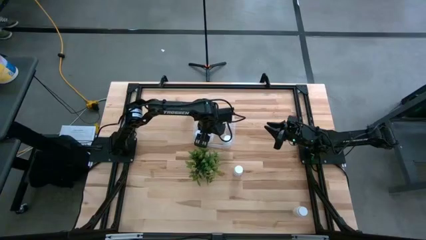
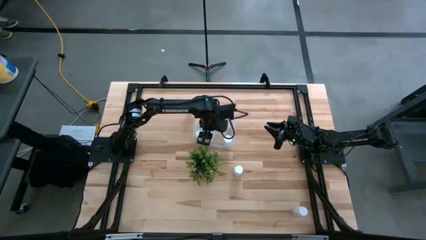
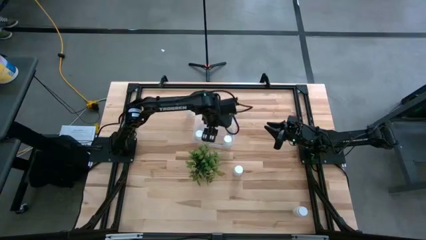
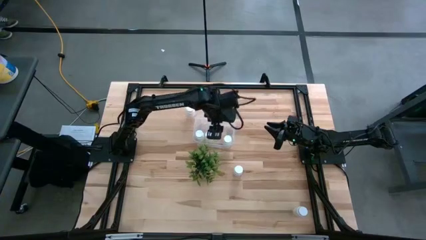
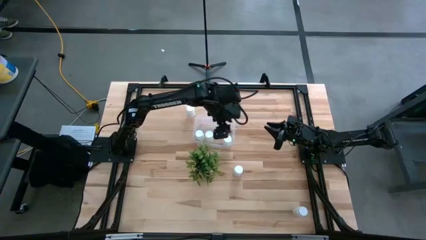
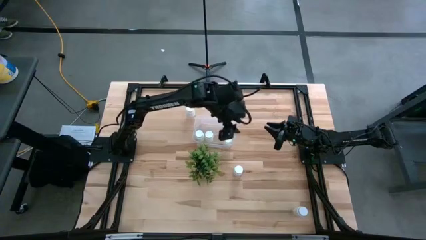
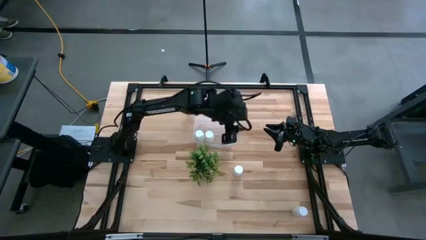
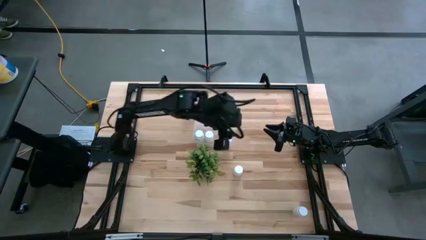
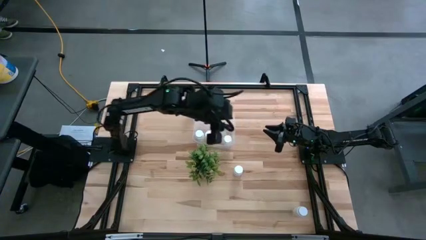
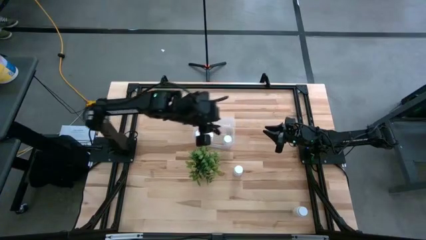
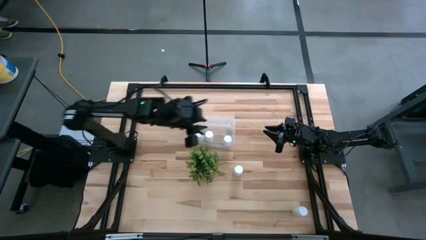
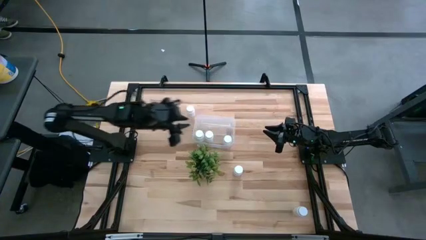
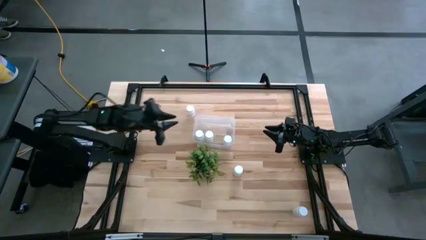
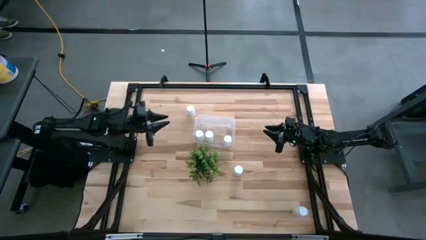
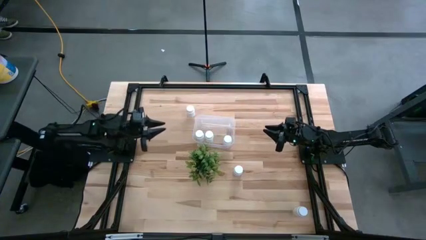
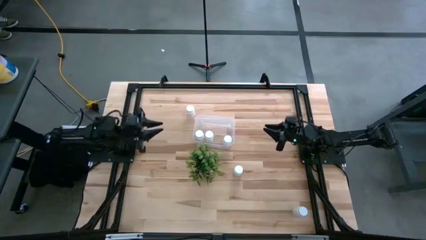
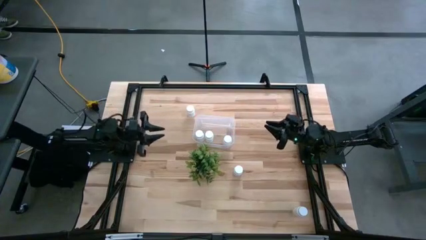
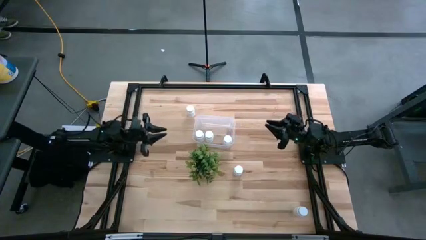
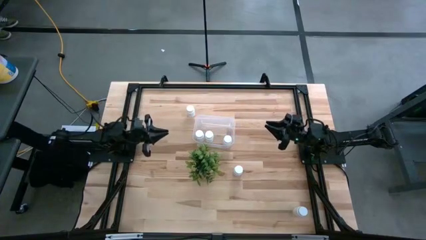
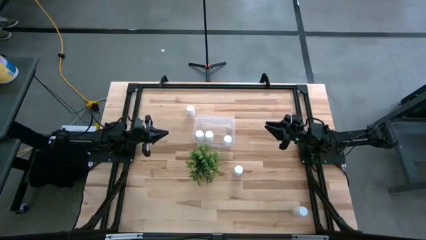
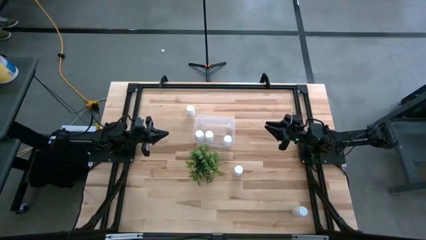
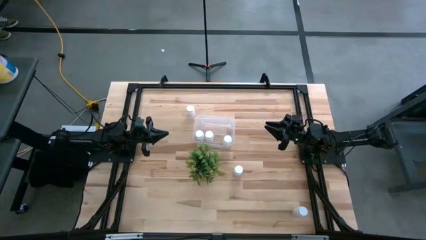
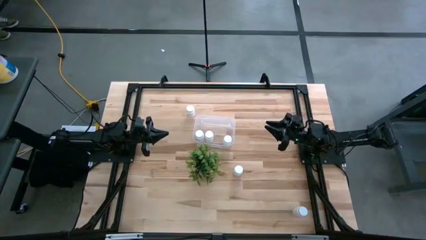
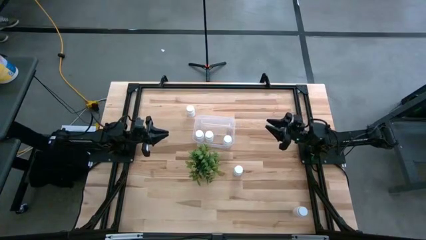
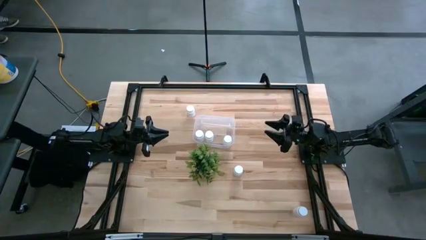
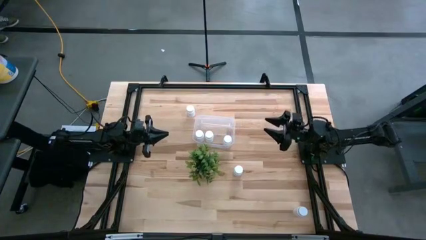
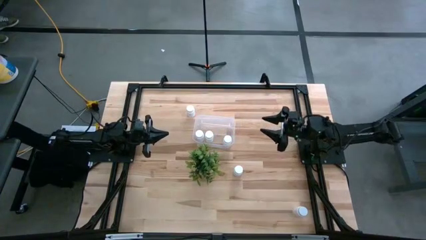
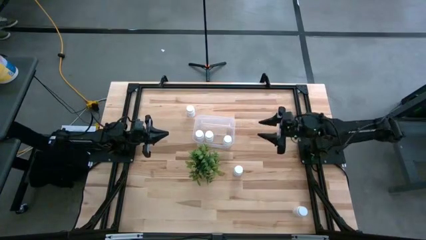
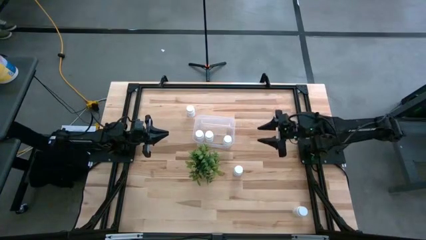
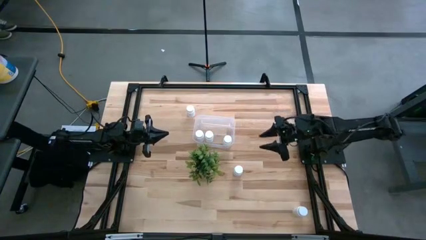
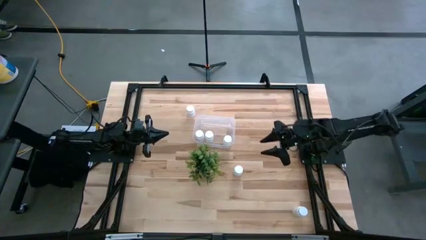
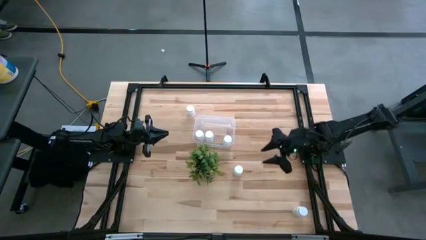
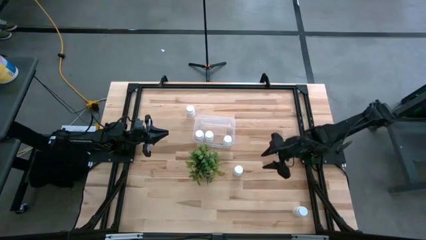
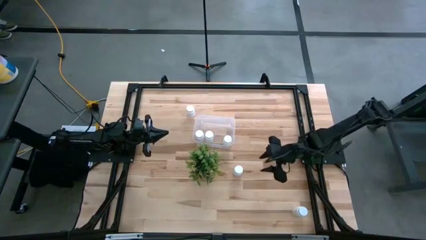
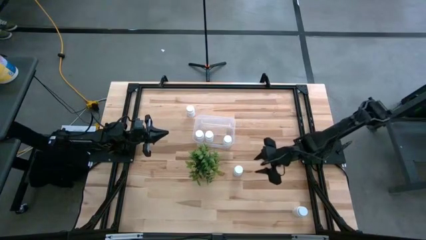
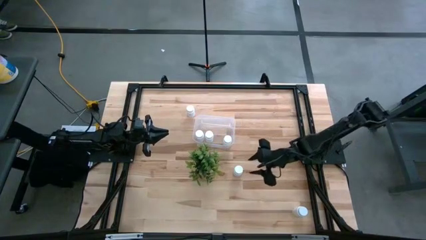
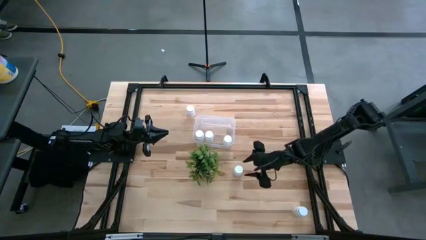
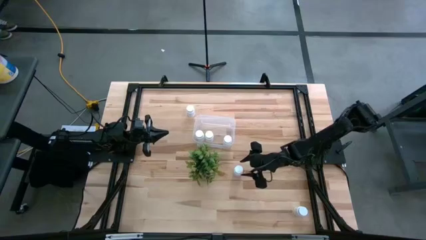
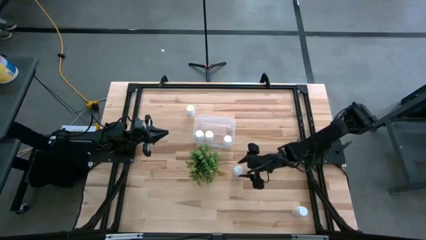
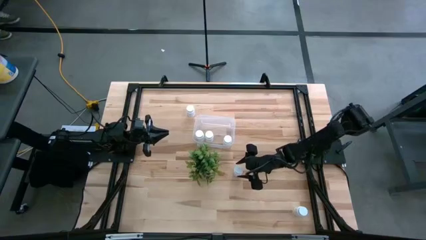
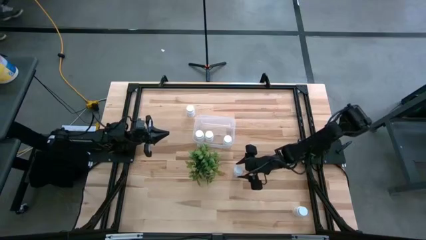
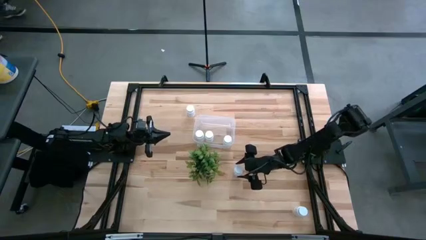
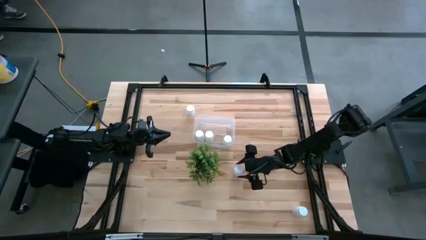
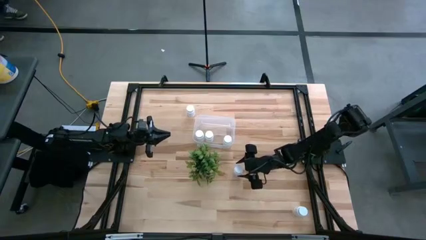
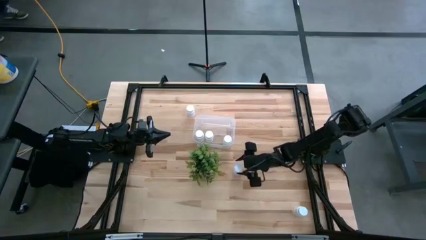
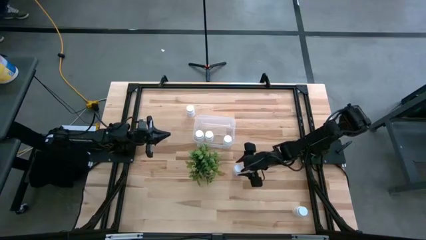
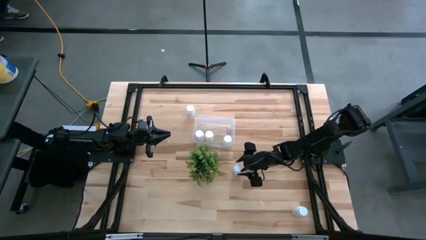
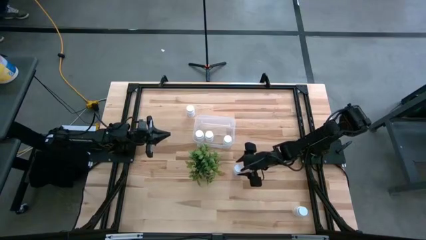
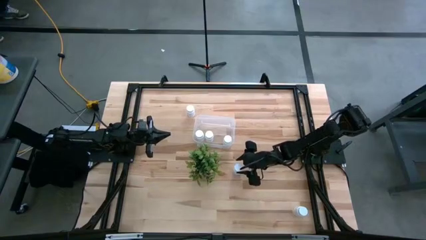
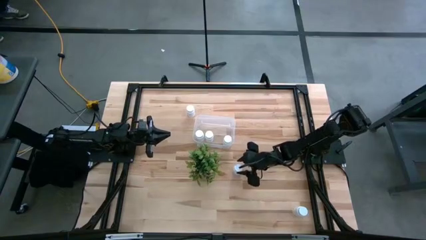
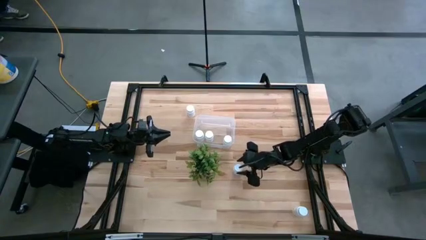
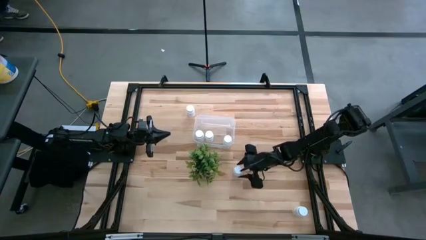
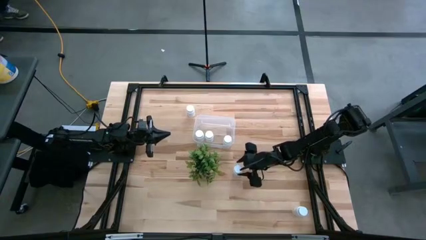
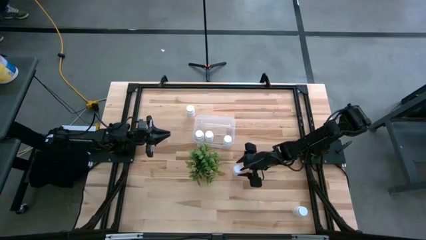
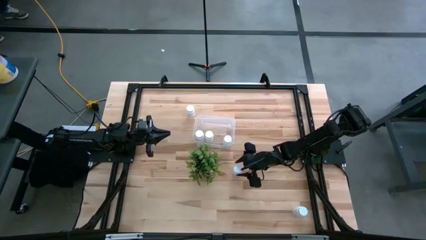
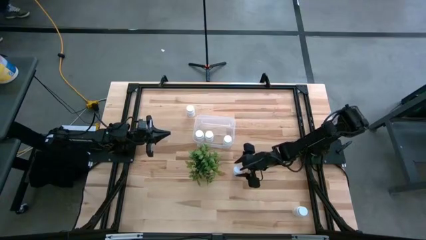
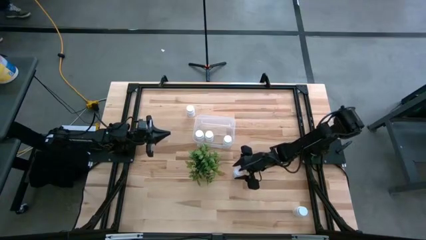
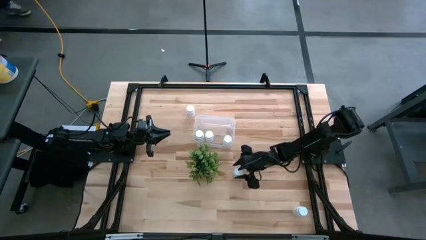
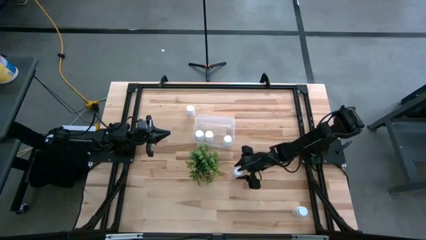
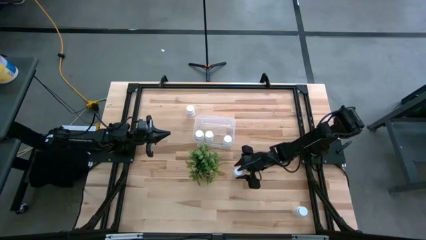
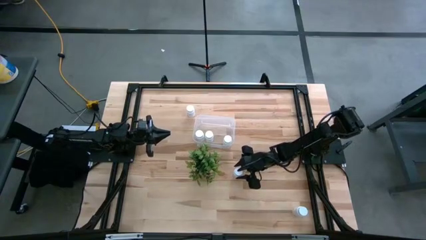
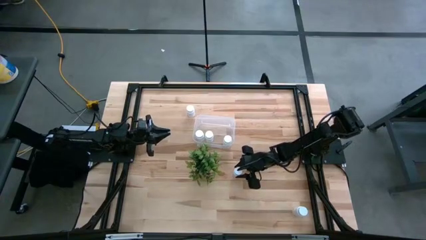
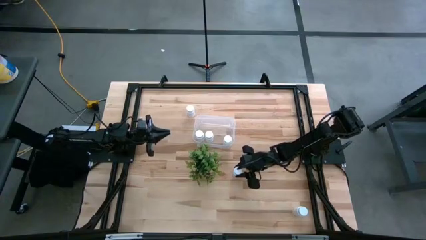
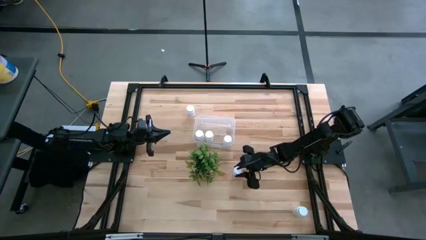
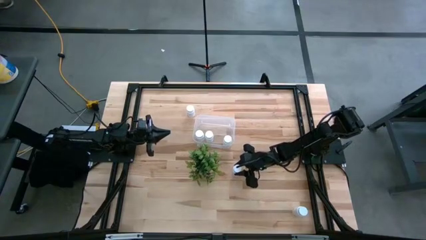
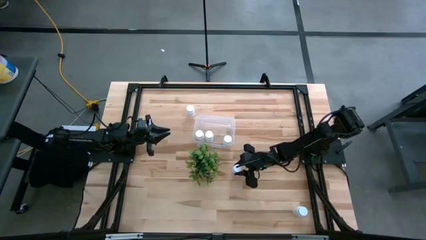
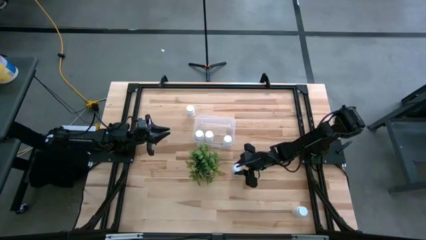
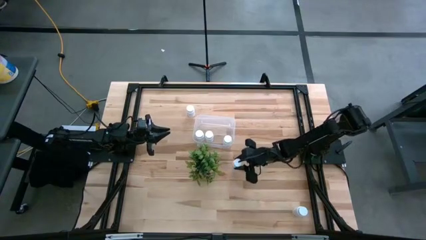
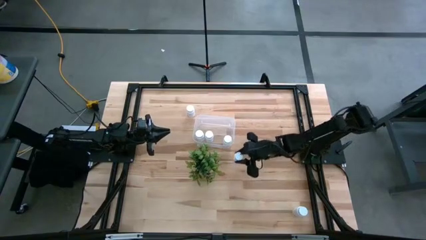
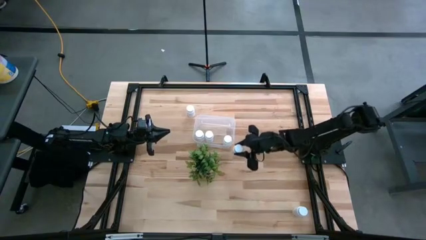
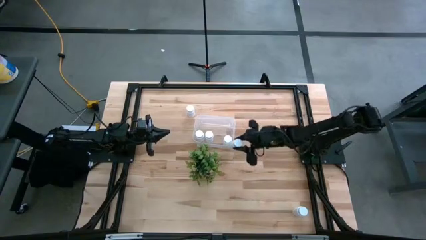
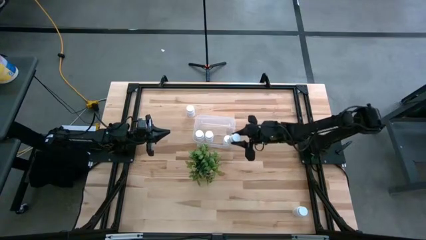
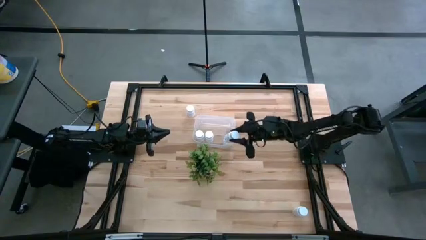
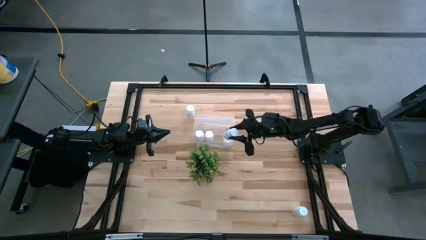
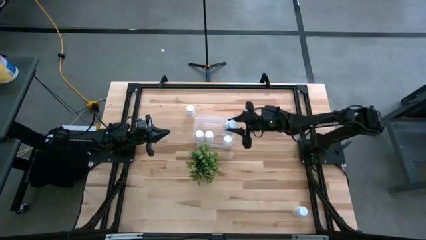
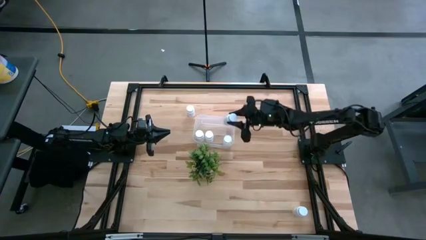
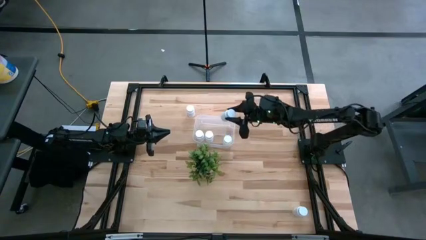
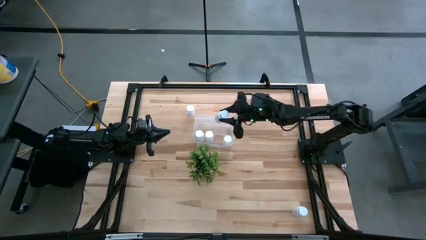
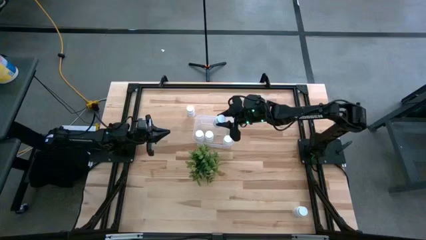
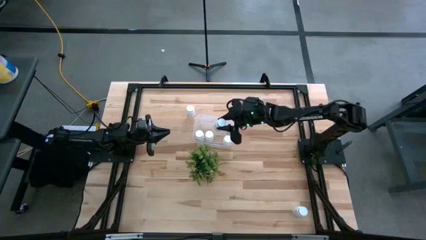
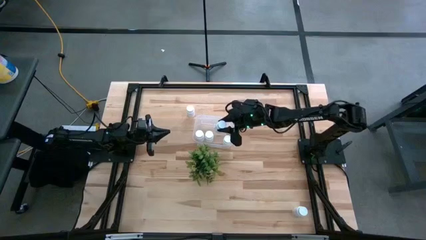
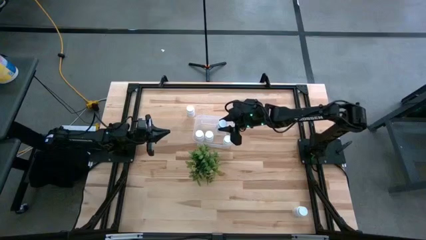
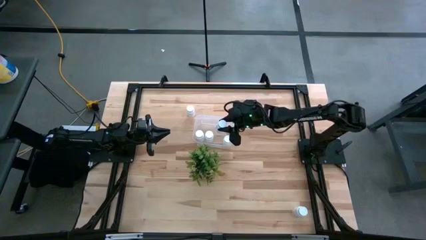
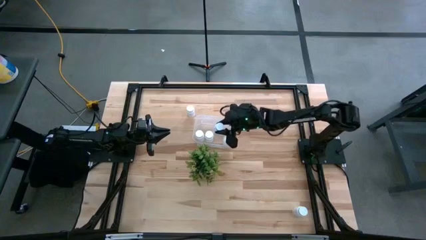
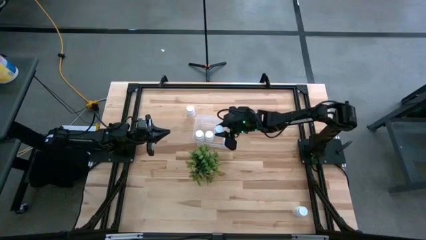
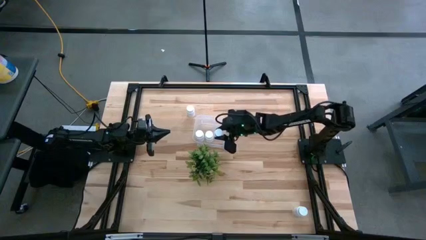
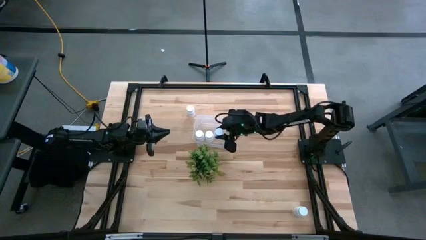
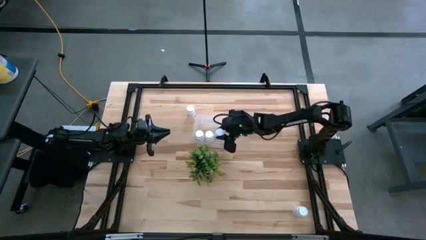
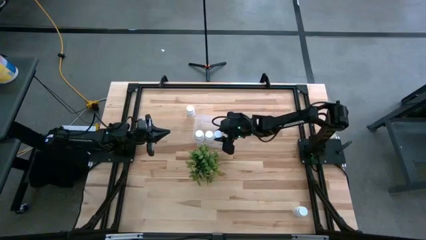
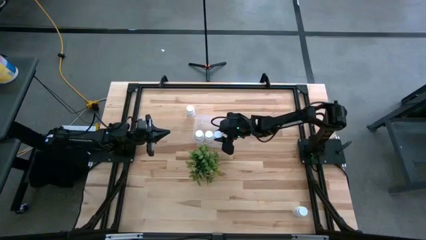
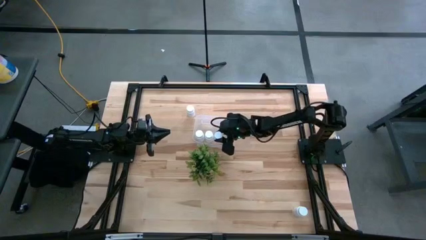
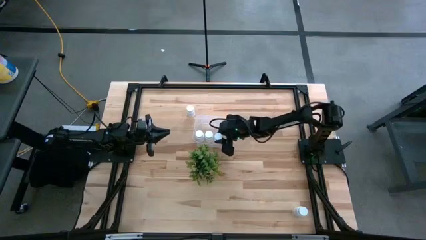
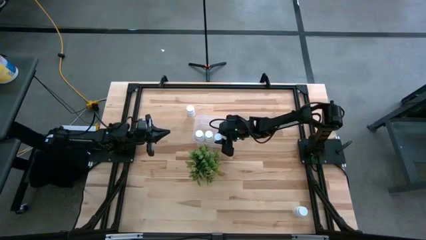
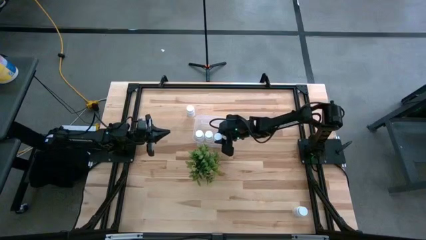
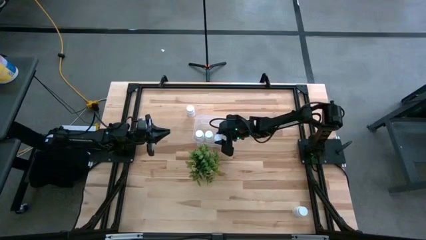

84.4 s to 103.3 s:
Task: Pick and place pill bottles into a basket
Put the white pill bottle in the transparent bin
